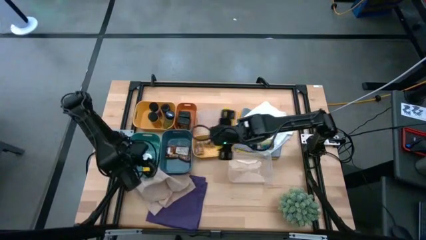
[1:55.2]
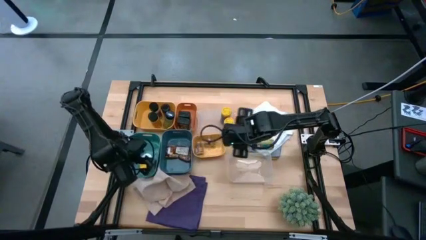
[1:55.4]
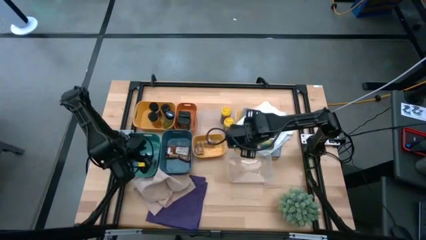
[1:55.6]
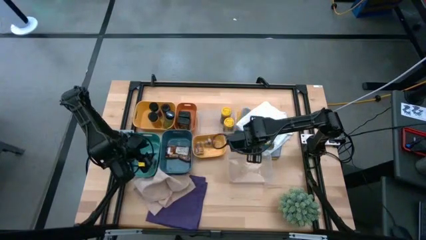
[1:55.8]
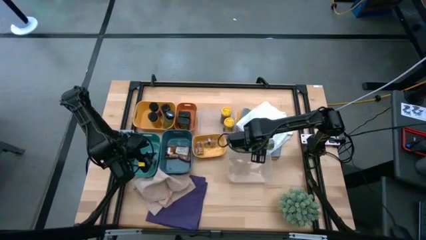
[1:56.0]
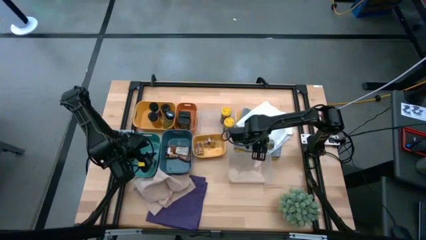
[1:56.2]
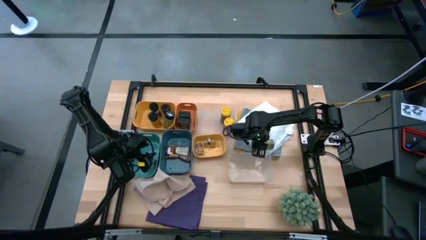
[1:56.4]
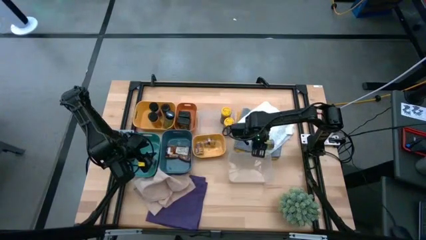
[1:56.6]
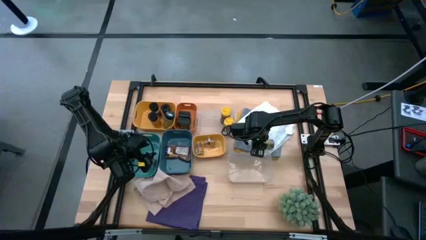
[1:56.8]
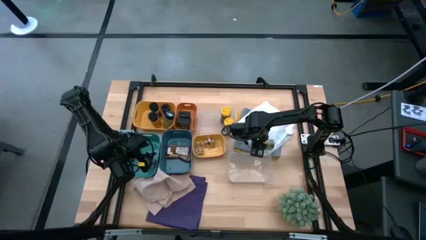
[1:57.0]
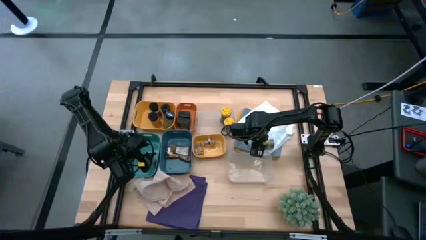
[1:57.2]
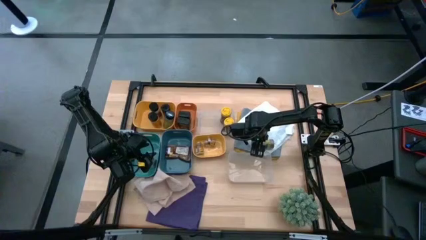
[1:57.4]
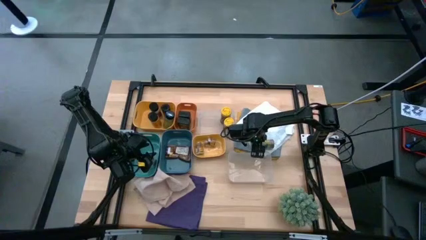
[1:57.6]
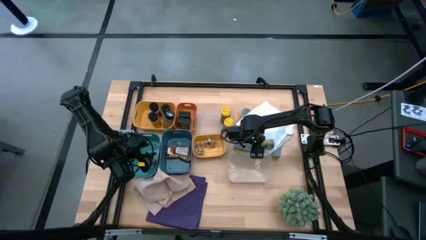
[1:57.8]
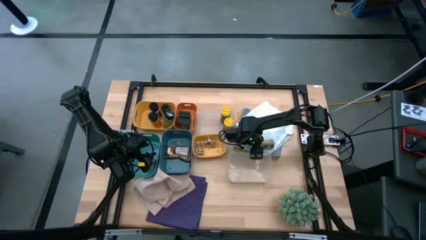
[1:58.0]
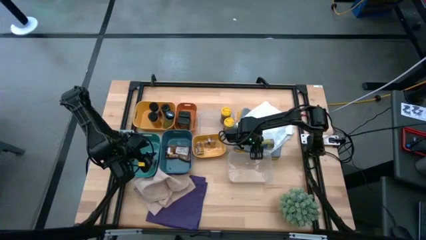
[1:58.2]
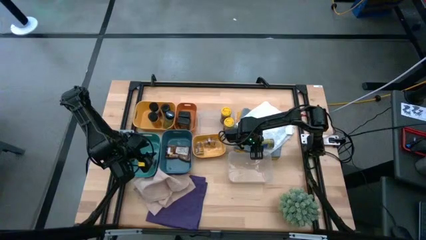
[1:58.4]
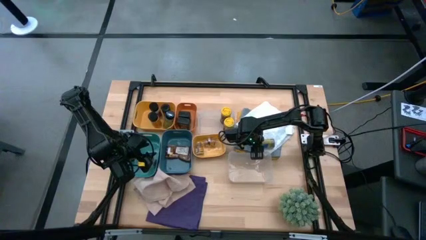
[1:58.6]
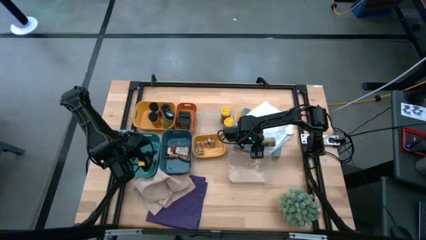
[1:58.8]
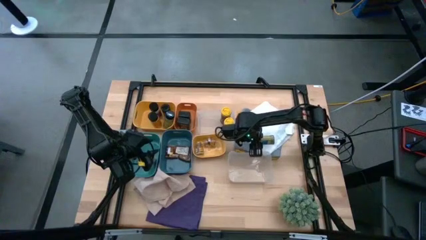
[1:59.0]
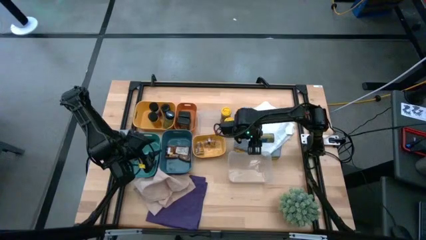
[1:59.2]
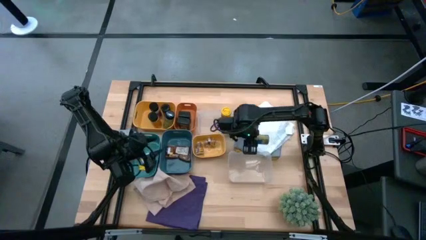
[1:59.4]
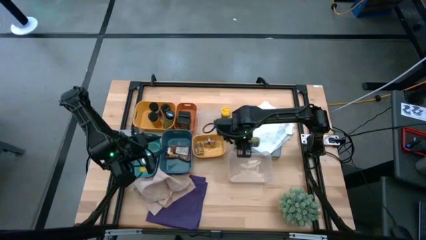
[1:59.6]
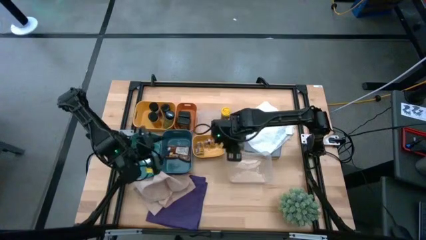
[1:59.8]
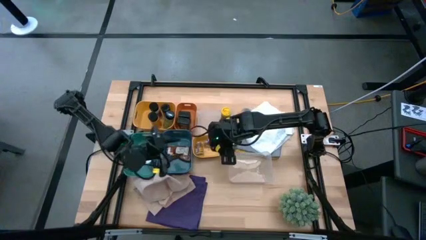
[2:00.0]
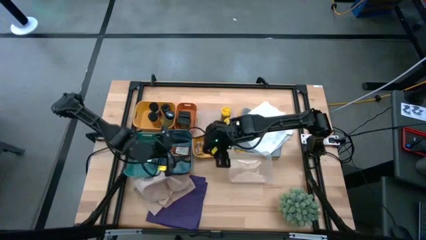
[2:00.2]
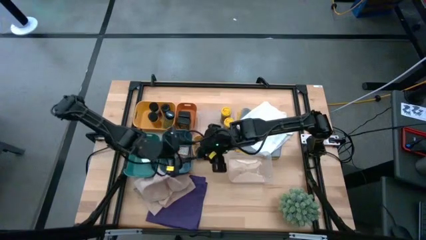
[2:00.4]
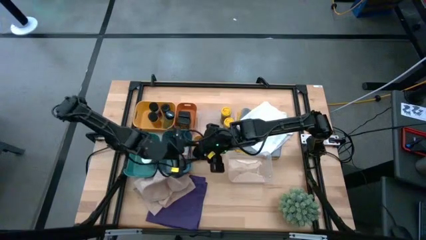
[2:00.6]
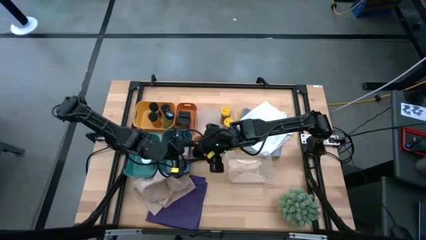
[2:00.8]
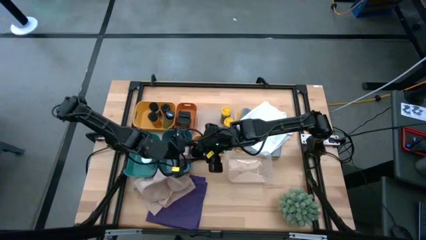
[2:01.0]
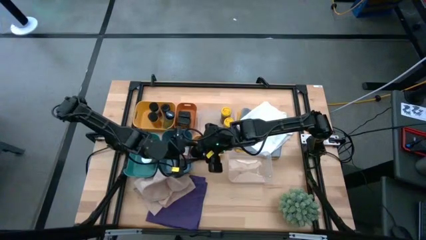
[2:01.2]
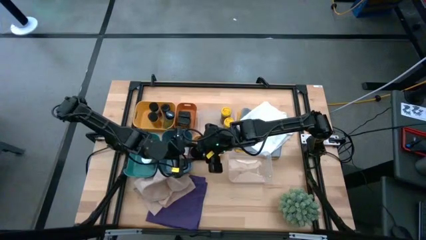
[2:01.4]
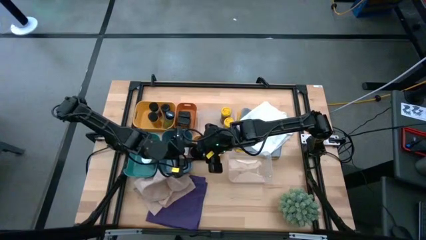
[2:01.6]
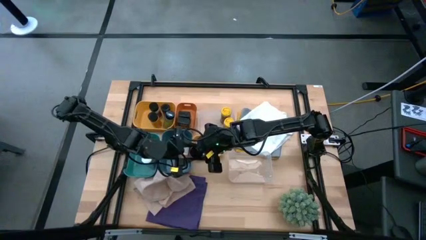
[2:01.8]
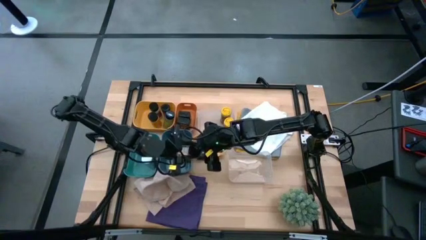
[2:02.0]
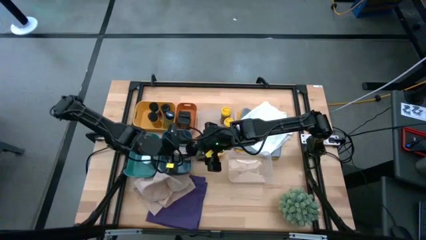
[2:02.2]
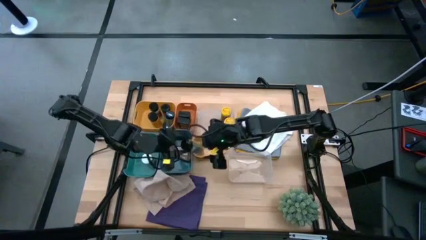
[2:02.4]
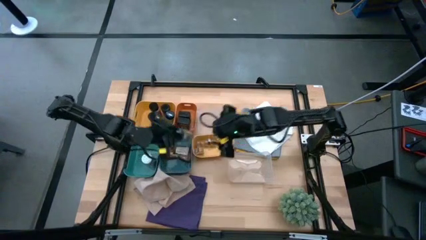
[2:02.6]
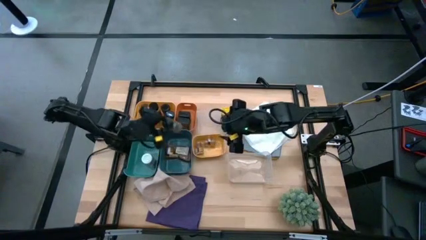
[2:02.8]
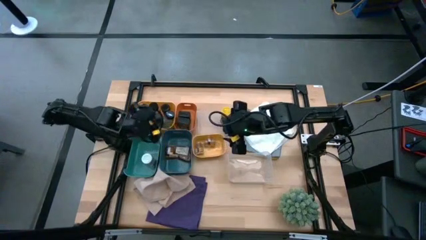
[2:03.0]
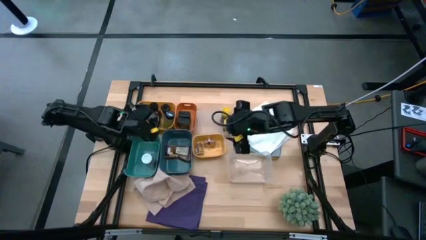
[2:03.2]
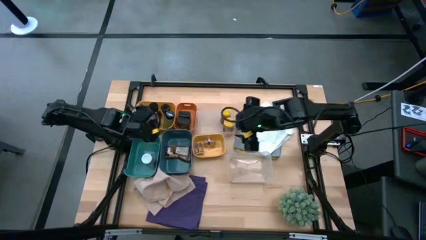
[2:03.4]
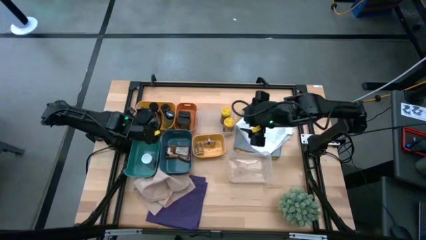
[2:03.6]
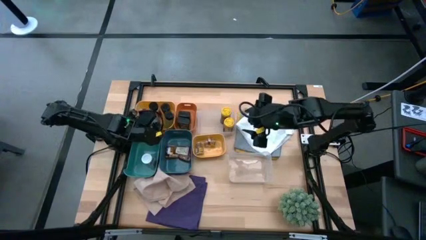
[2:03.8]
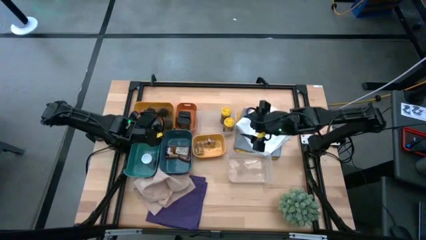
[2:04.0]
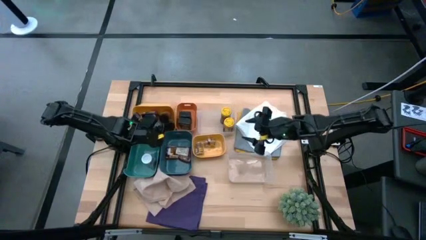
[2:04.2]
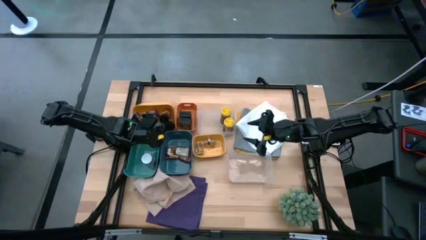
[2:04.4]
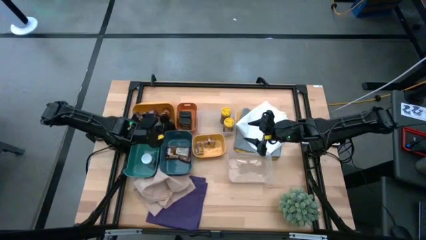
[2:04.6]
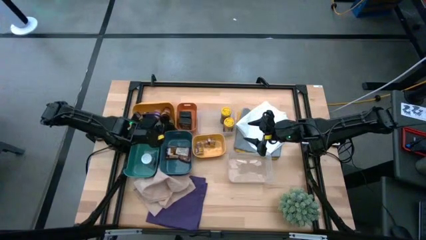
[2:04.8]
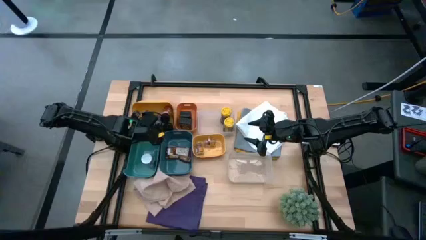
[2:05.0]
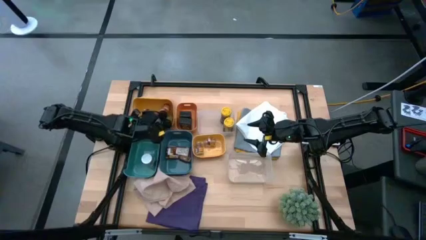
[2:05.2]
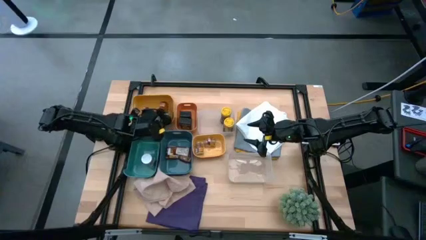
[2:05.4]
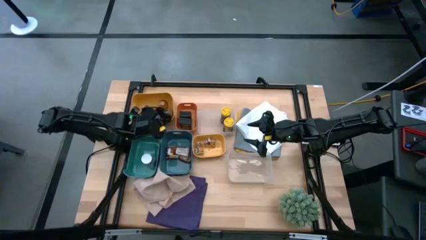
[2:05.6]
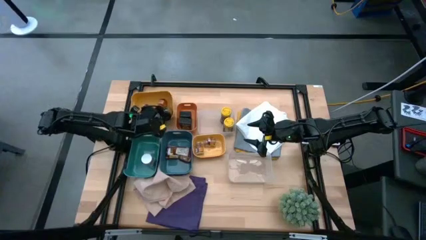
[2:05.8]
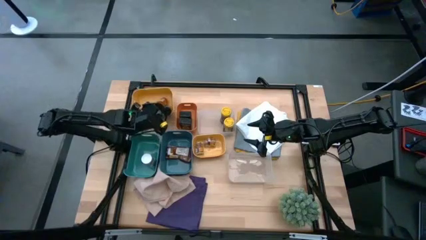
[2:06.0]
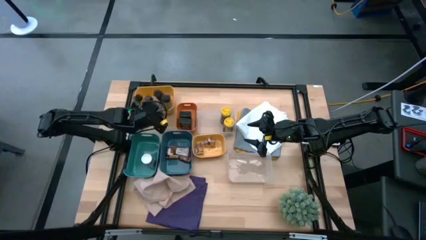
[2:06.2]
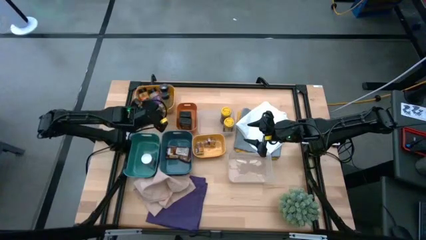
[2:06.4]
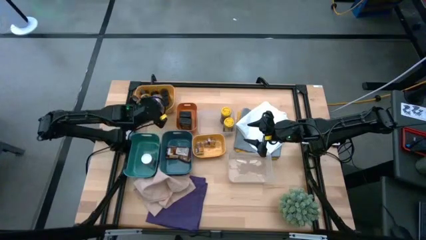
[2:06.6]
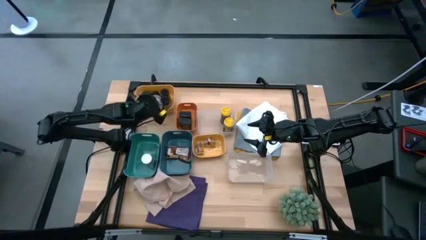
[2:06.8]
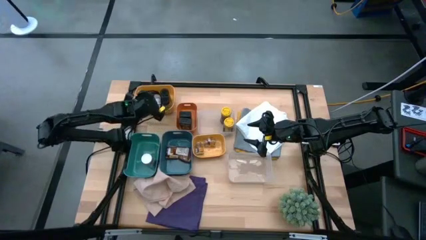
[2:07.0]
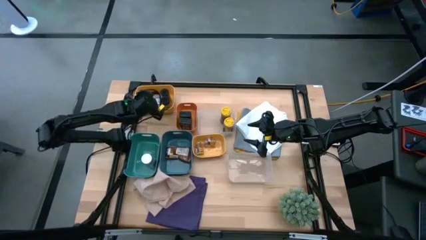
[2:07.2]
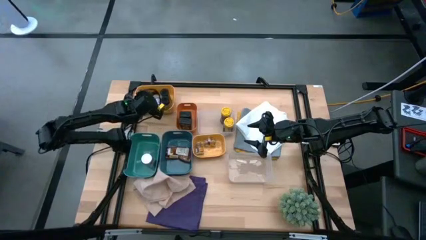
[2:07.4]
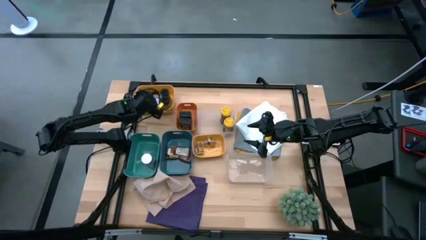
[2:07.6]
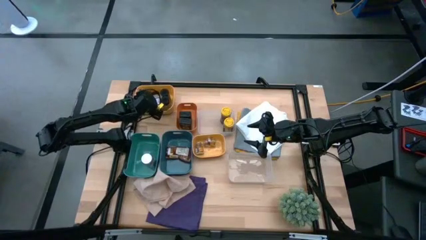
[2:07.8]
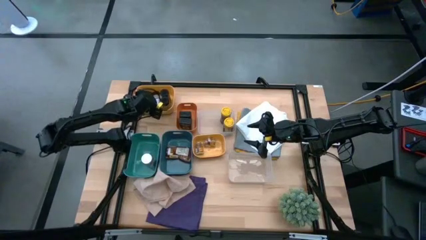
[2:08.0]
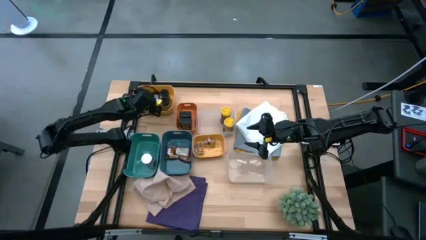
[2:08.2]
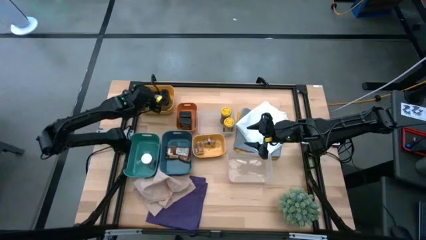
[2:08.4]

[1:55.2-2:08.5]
Task: Sort spices by type
Put the green spice bottle on the top yellow bin
